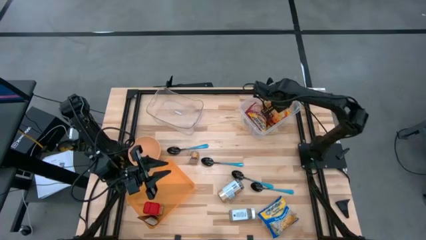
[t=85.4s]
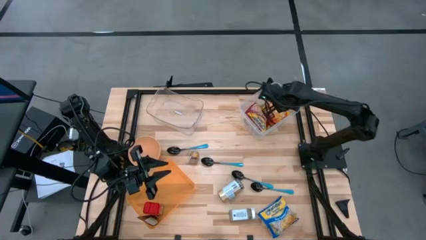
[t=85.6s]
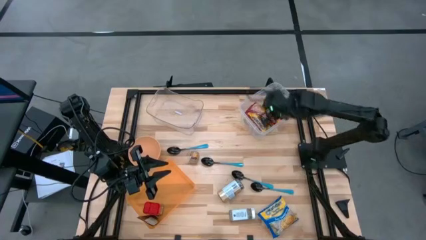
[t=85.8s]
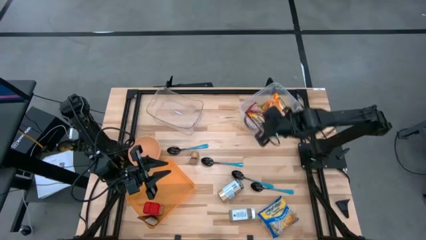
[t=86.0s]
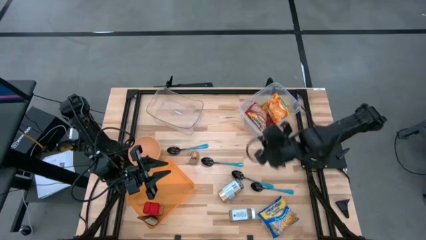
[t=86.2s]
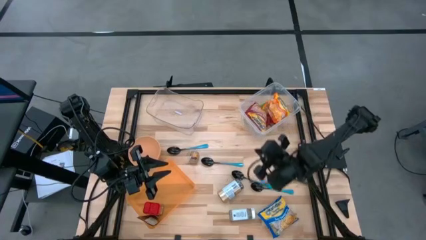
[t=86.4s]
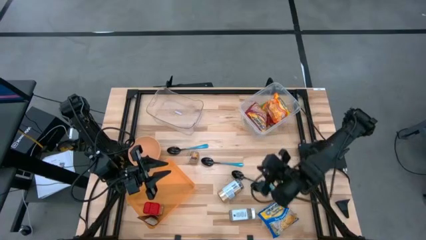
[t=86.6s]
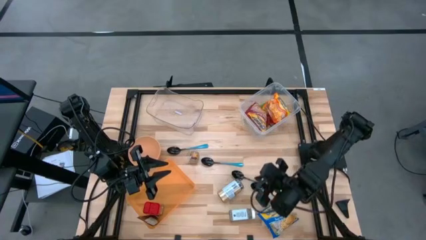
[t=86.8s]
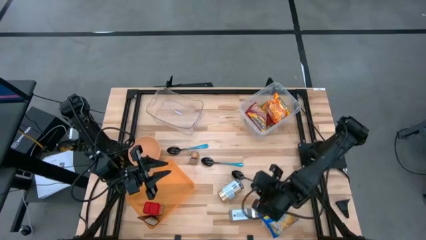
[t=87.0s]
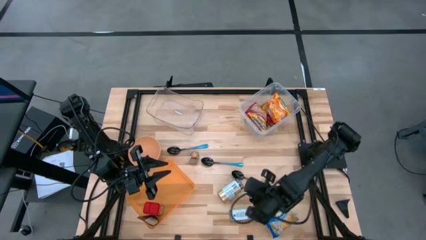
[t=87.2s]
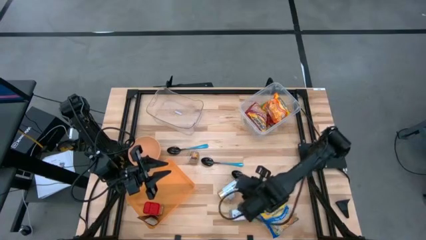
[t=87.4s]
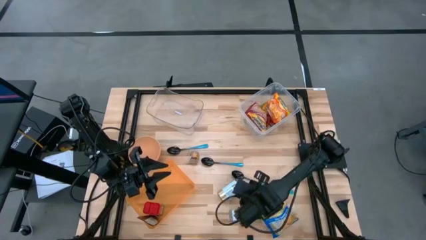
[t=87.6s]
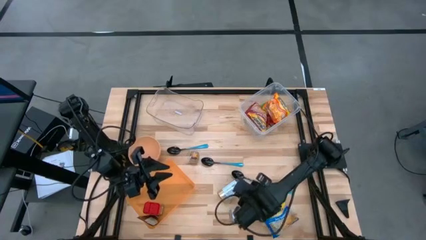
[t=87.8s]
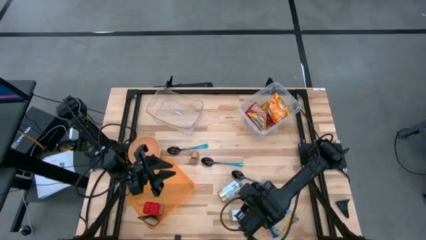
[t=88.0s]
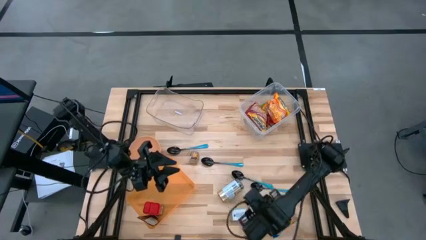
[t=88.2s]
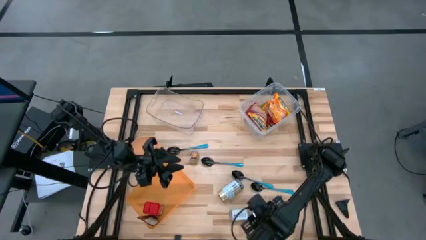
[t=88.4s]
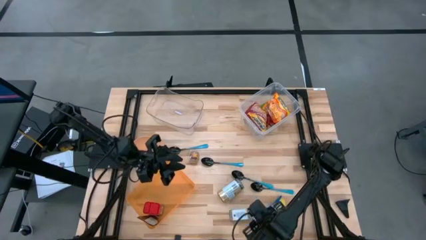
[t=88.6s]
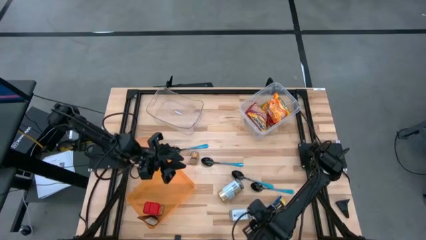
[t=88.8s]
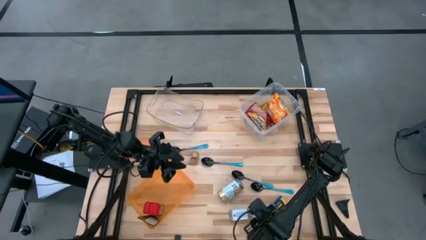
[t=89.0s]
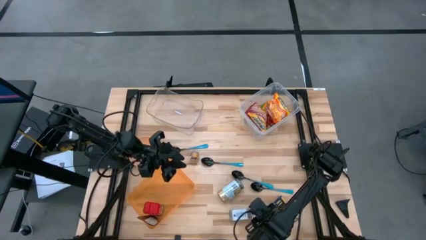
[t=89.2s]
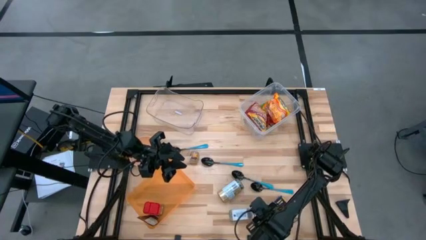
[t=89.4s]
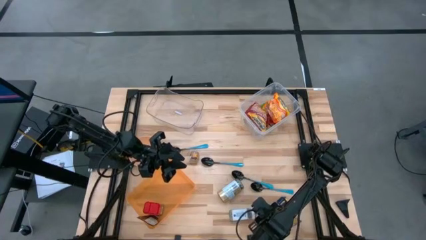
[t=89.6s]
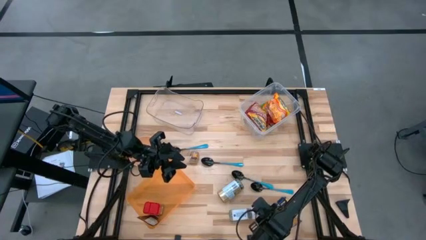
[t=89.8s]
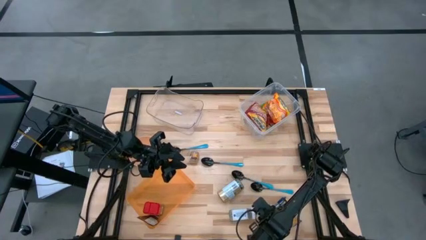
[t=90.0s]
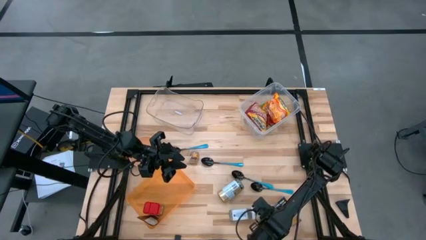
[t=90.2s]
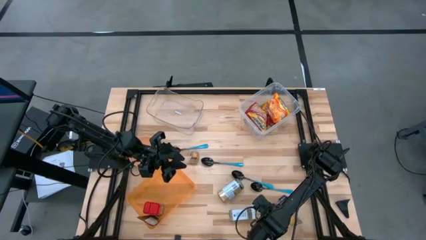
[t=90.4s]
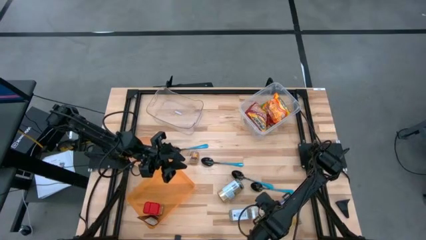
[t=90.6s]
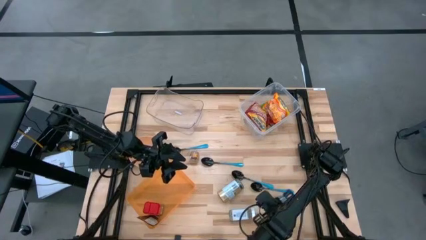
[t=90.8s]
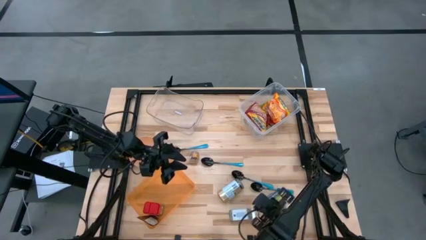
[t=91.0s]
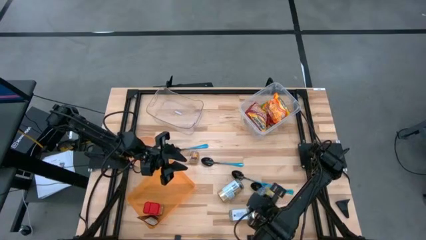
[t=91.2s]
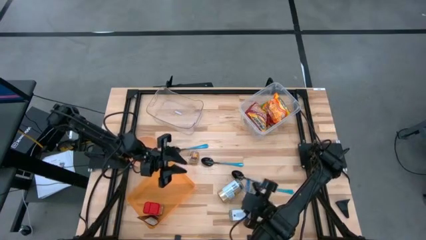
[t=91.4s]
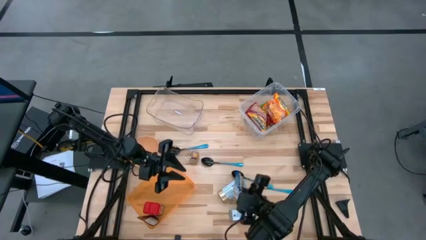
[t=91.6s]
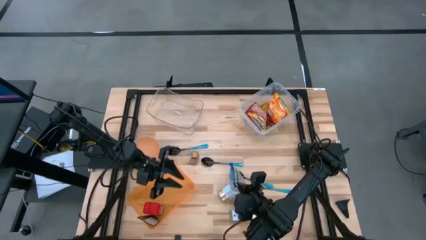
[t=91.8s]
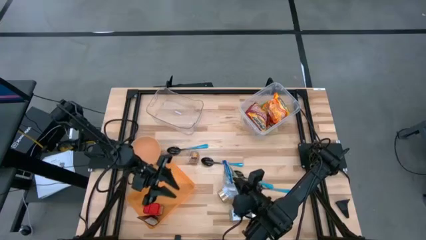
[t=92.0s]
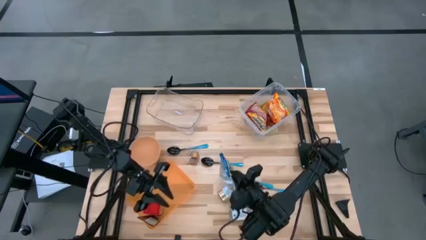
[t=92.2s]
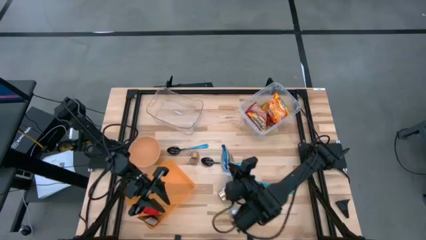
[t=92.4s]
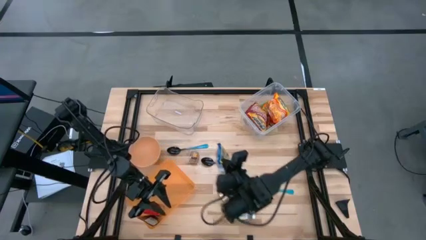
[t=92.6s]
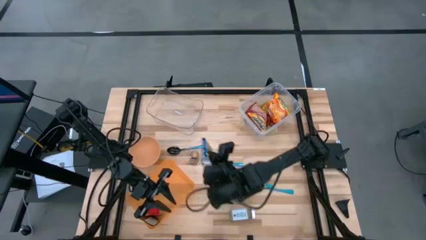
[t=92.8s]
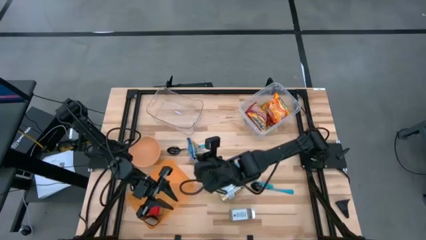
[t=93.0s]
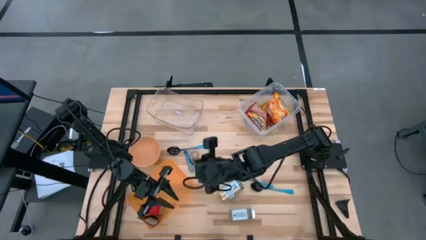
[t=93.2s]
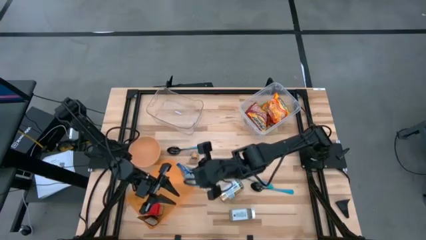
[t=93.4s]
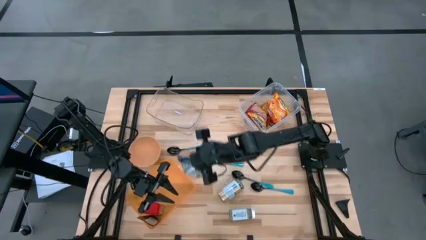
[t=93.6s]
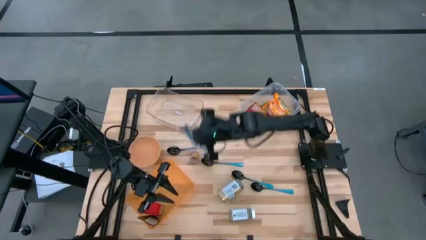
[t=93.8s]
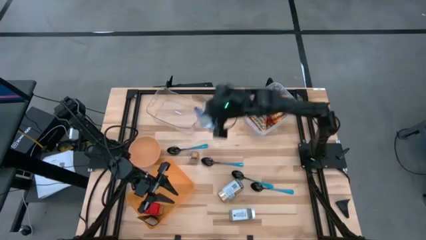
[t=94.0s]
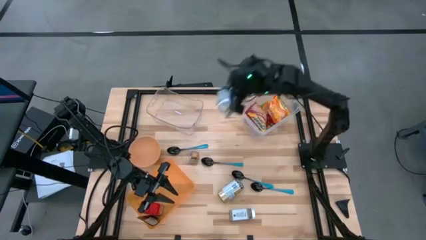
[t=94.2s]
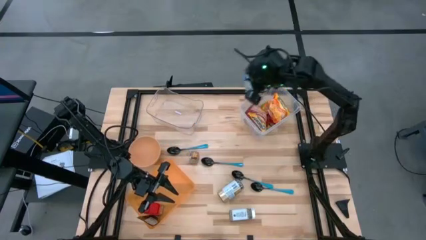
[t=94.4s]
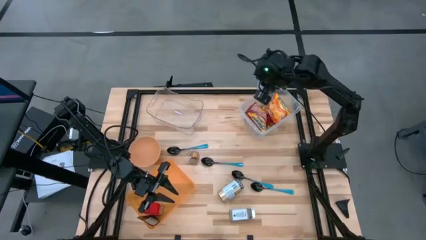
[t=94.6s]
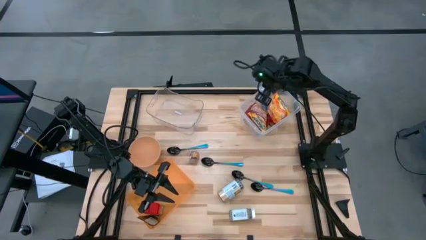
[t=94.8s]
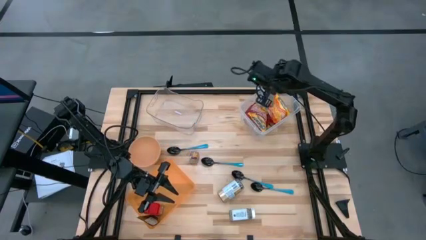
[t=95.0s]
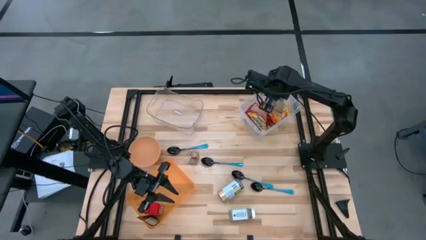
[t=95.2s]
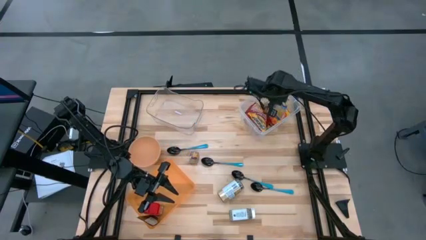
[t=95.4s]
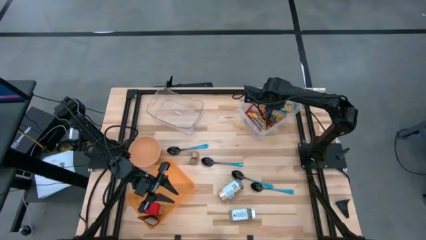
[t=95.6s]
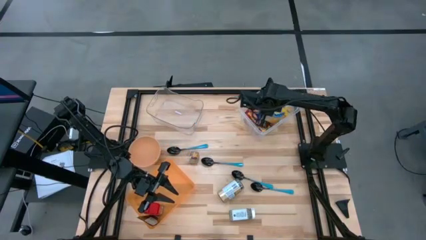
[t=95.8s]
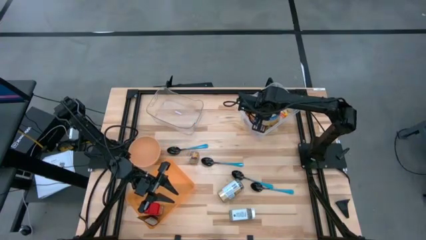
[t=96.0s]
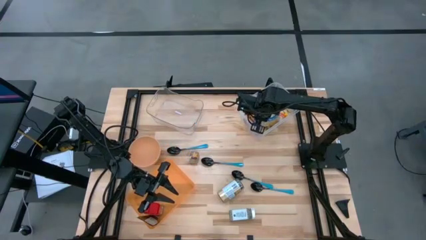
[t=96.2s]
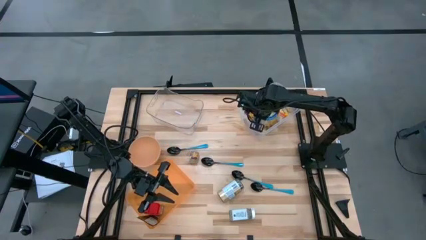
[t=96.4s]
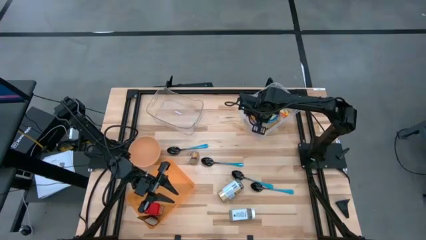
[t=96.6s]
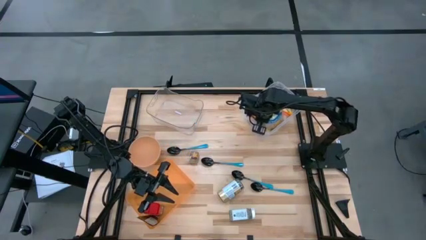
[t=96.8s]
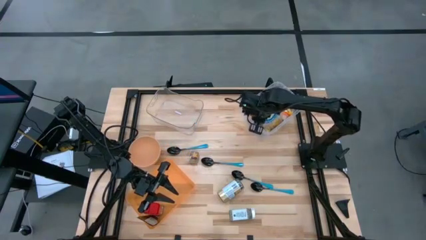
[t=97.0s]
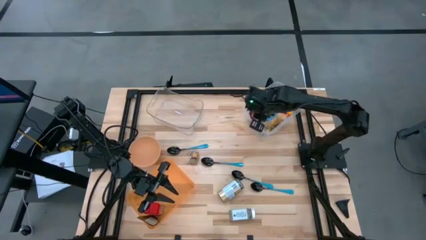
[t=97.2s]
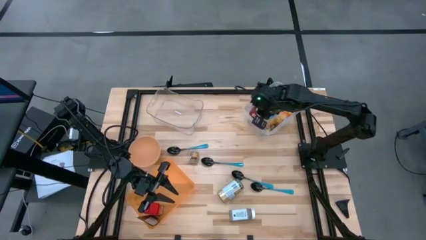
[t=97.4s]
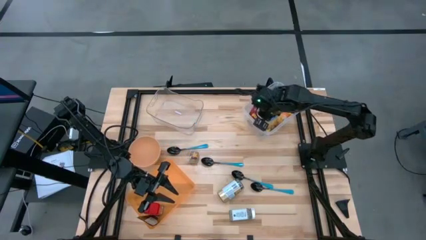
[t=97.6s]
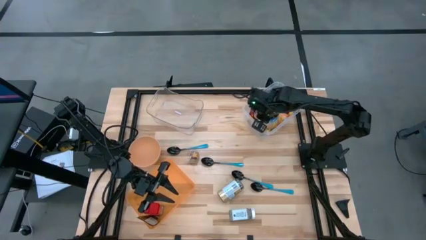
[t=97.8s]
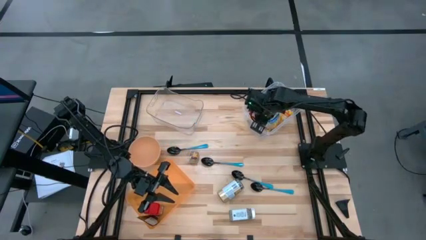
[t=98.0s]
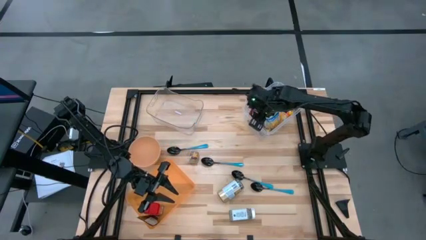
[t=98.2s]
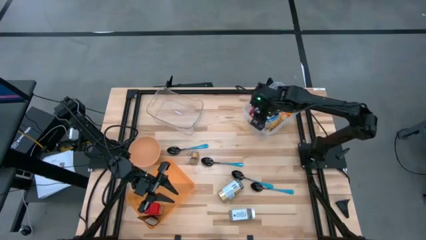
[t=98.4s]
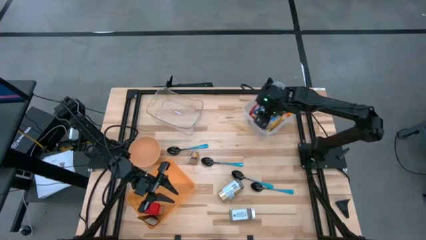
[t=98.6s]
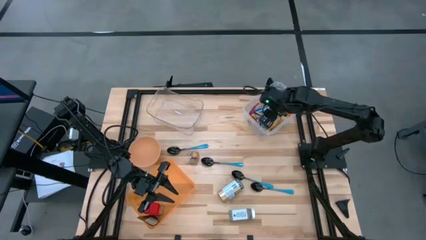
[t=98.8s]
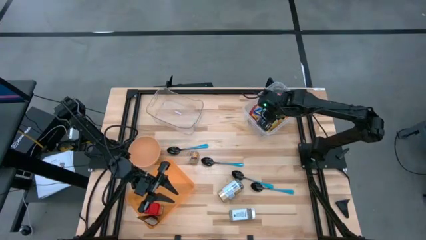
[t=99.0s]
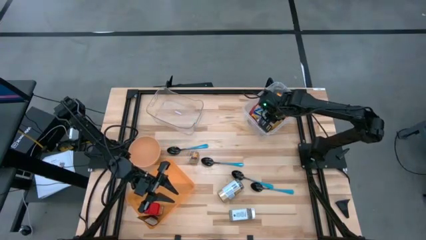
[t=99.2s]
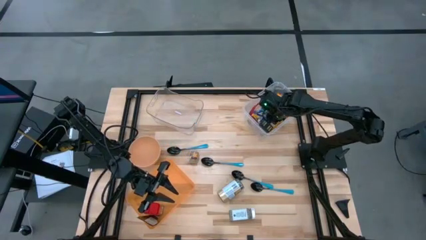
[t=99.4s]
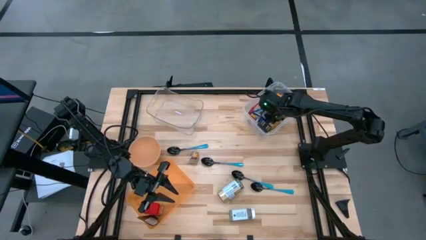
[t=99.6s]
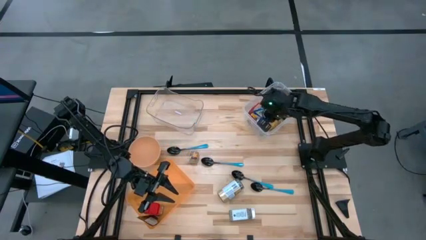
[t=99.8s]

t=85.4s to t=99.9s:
Task: Pick & Place Food Item
Put the blue noodle pack into the right transparent bin
